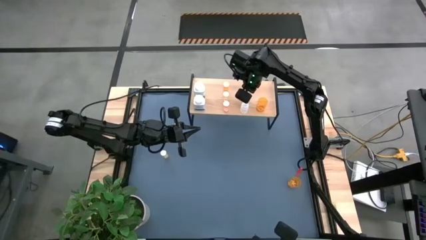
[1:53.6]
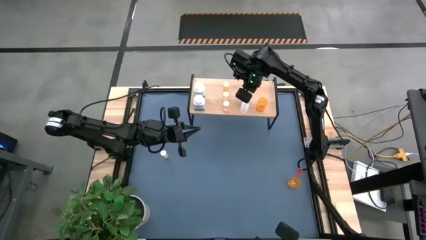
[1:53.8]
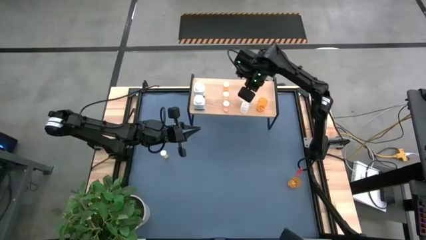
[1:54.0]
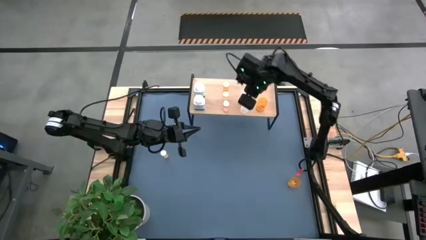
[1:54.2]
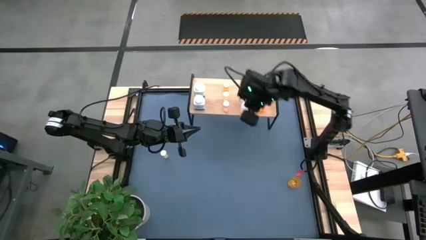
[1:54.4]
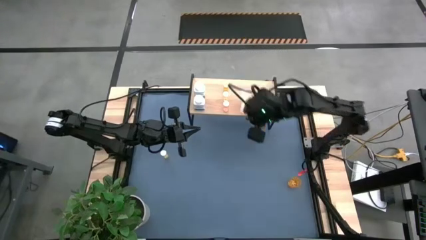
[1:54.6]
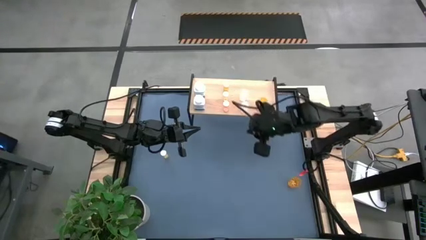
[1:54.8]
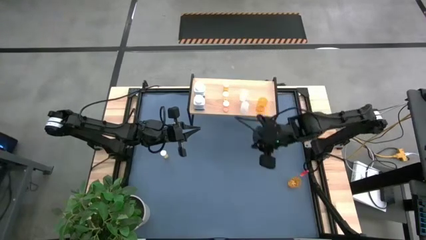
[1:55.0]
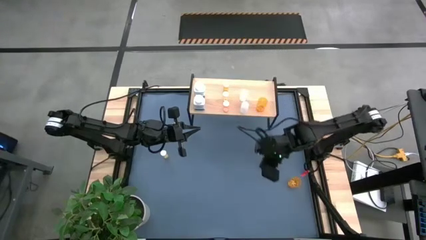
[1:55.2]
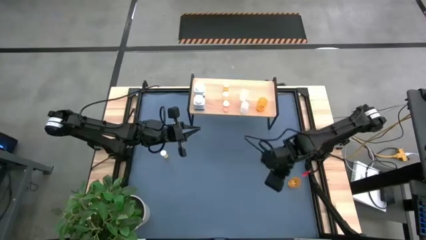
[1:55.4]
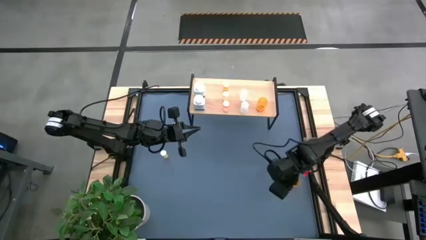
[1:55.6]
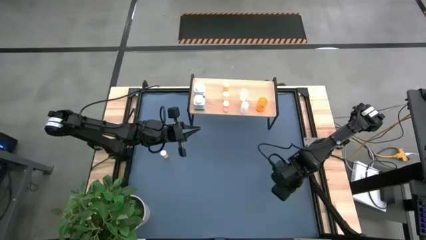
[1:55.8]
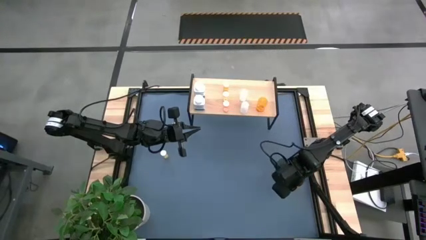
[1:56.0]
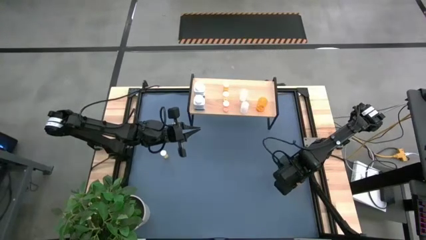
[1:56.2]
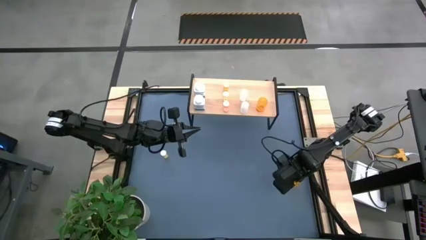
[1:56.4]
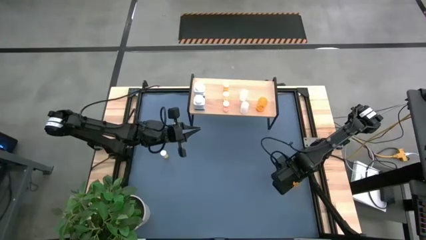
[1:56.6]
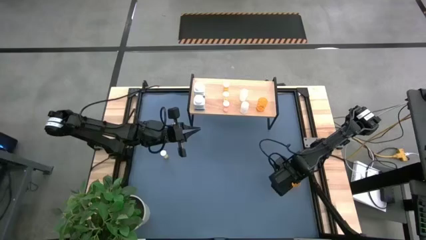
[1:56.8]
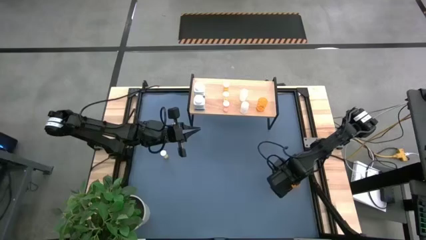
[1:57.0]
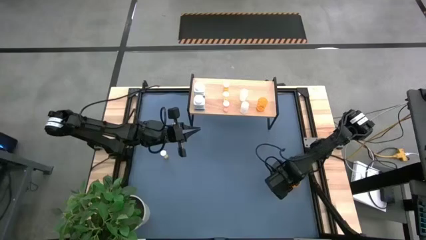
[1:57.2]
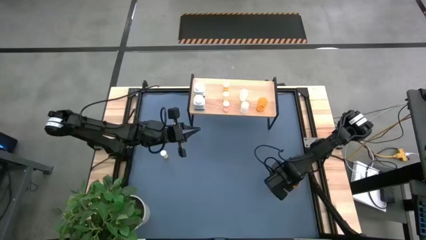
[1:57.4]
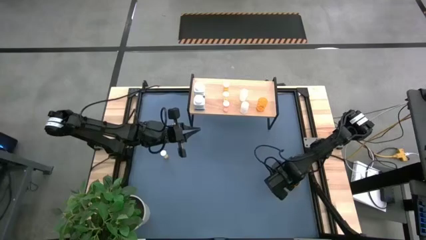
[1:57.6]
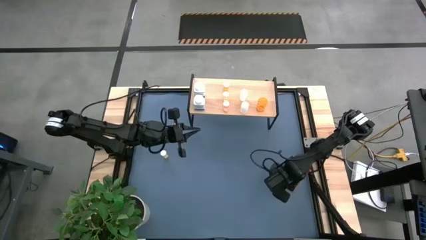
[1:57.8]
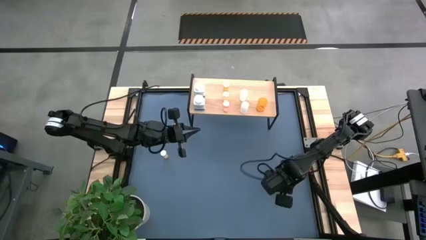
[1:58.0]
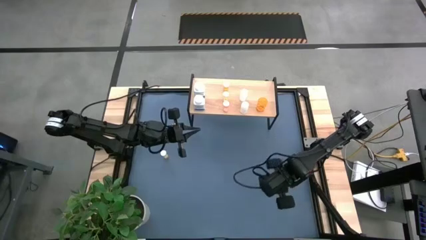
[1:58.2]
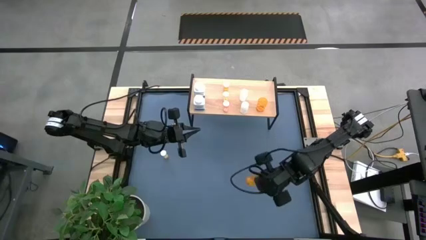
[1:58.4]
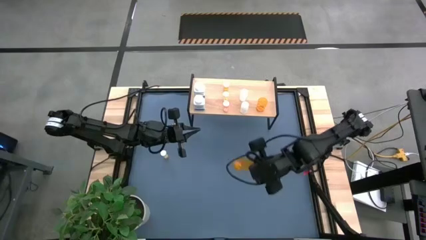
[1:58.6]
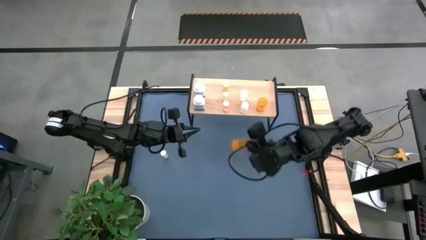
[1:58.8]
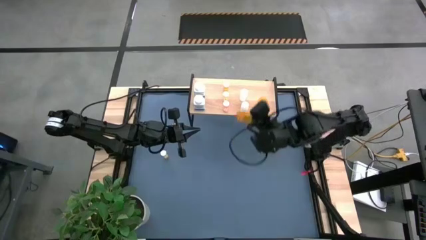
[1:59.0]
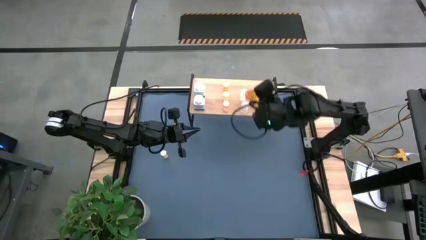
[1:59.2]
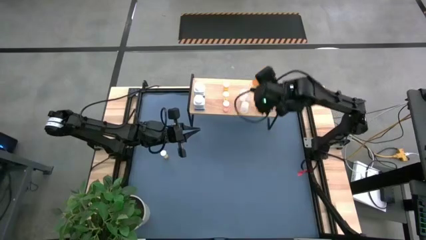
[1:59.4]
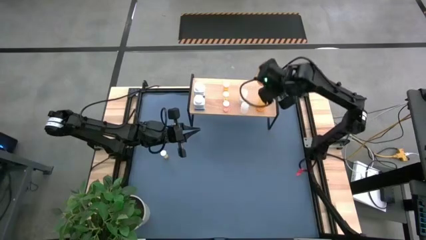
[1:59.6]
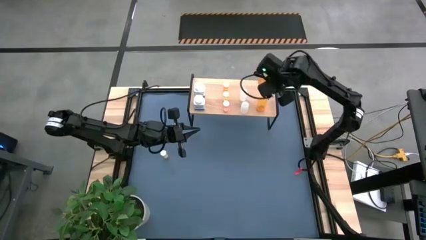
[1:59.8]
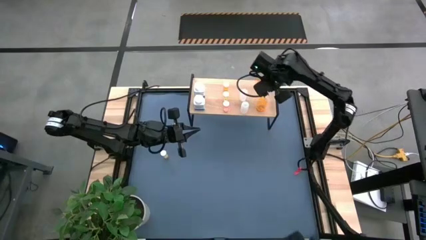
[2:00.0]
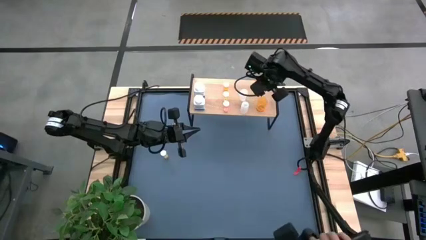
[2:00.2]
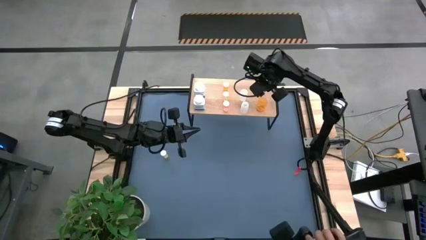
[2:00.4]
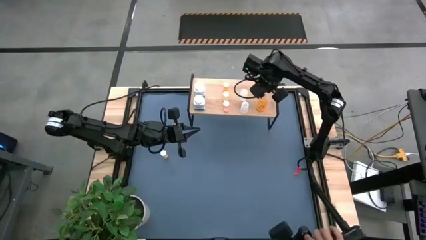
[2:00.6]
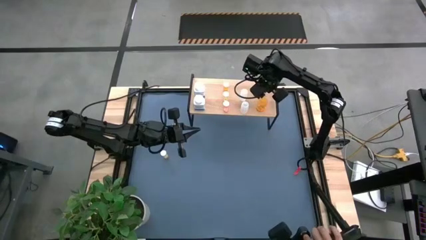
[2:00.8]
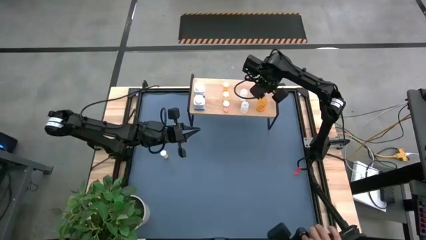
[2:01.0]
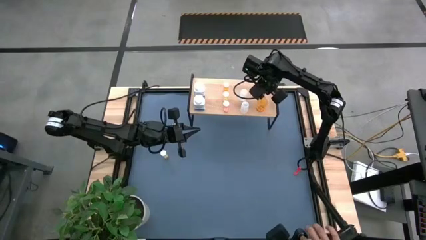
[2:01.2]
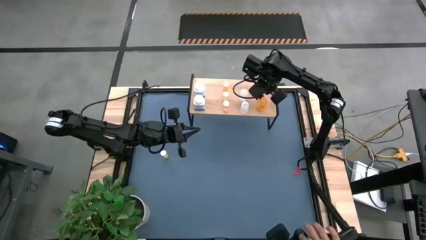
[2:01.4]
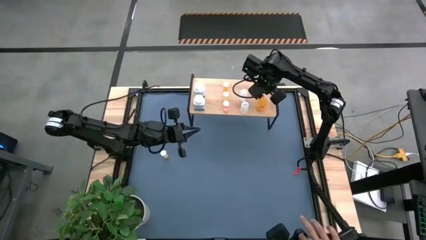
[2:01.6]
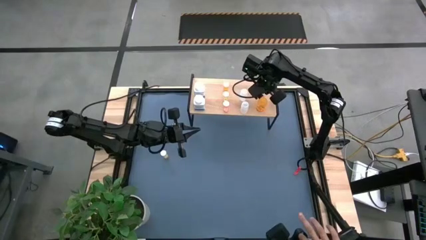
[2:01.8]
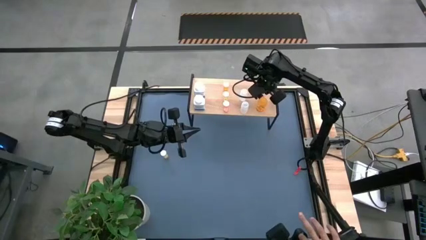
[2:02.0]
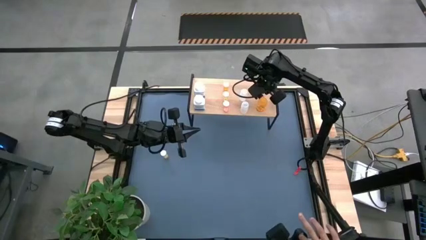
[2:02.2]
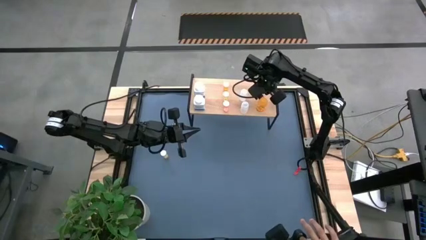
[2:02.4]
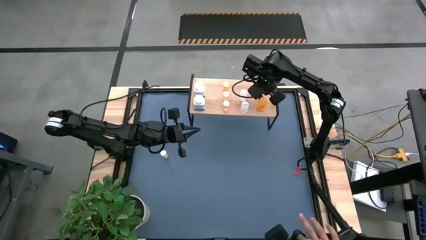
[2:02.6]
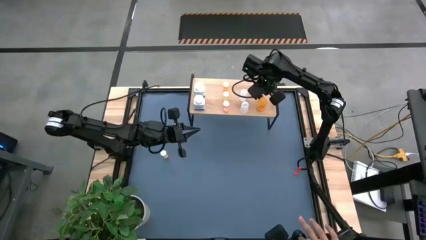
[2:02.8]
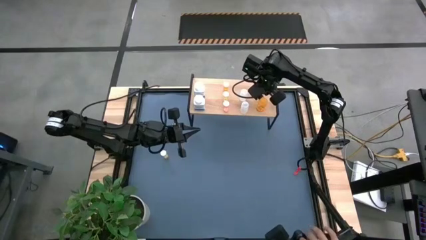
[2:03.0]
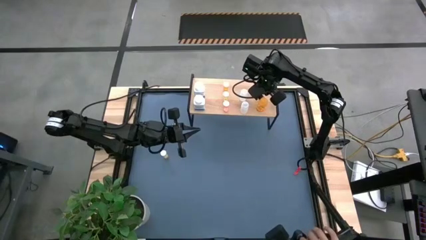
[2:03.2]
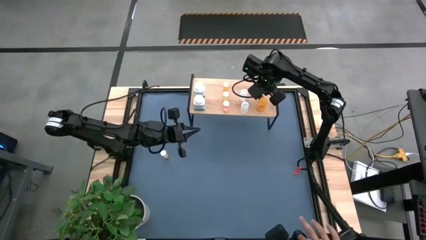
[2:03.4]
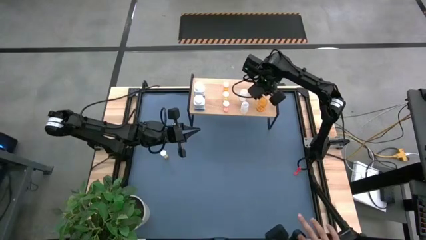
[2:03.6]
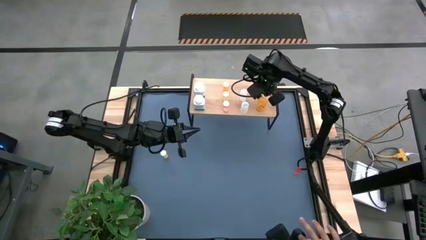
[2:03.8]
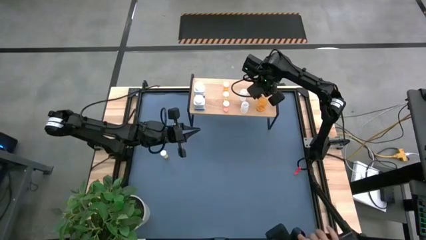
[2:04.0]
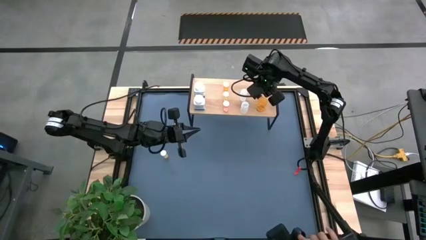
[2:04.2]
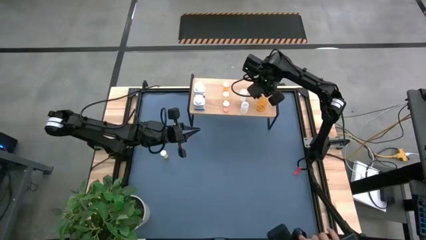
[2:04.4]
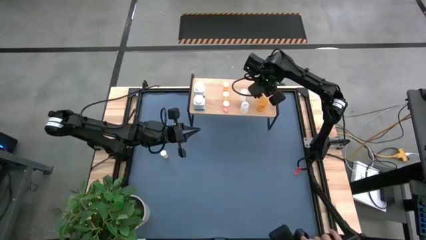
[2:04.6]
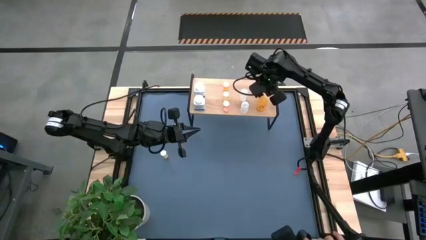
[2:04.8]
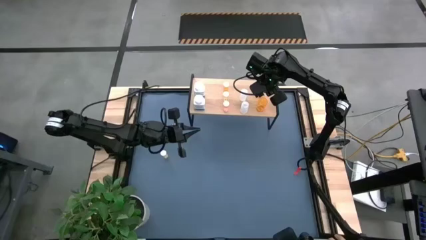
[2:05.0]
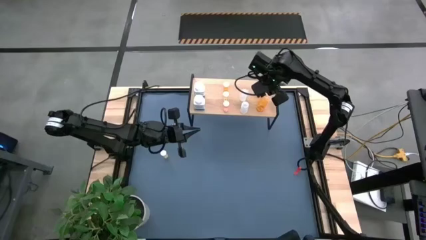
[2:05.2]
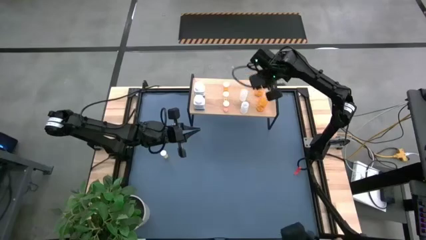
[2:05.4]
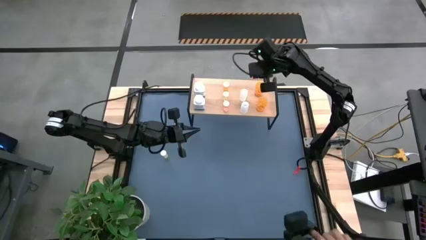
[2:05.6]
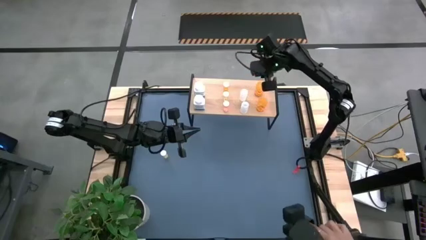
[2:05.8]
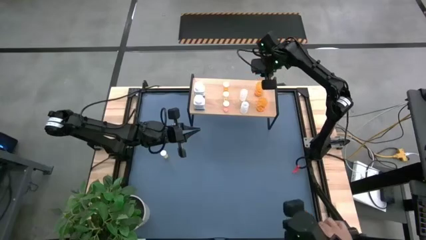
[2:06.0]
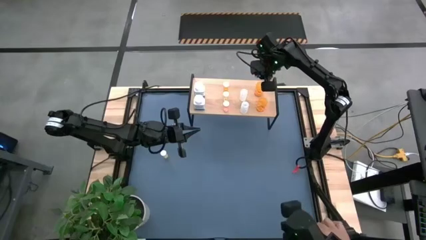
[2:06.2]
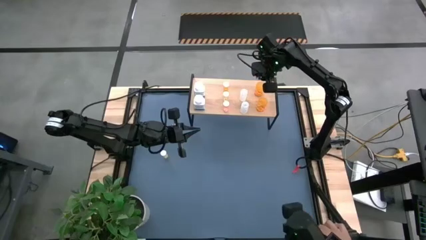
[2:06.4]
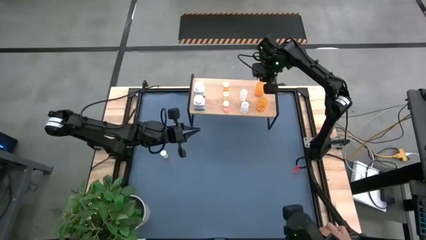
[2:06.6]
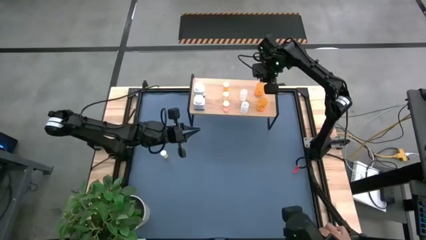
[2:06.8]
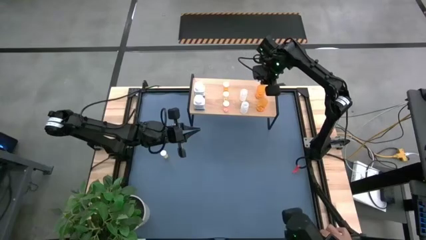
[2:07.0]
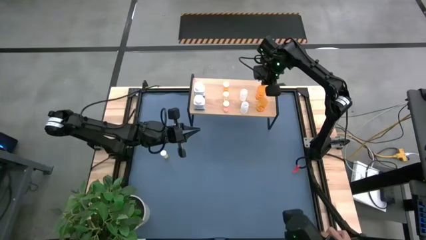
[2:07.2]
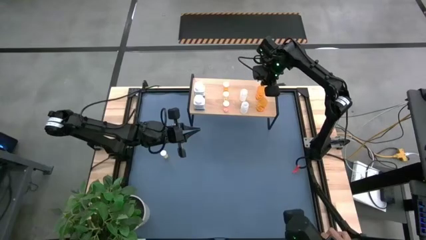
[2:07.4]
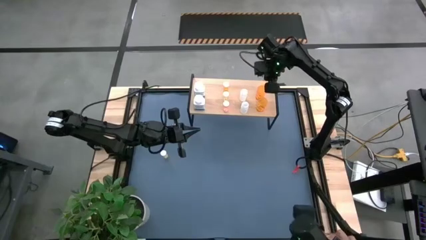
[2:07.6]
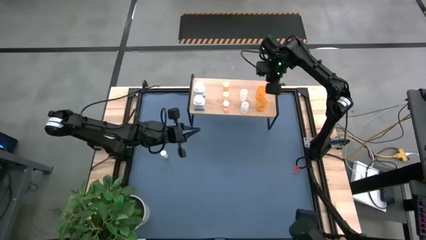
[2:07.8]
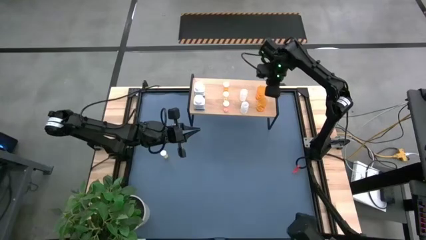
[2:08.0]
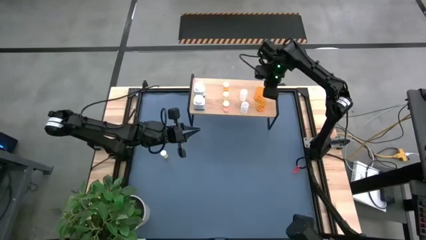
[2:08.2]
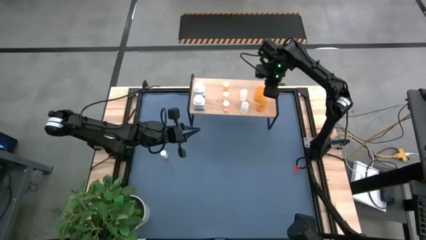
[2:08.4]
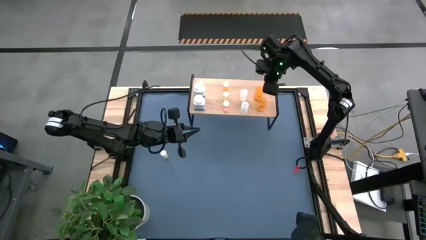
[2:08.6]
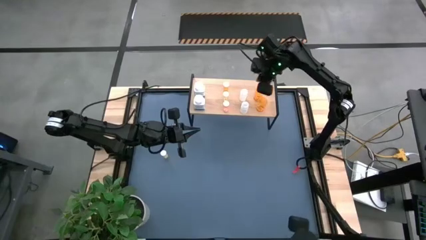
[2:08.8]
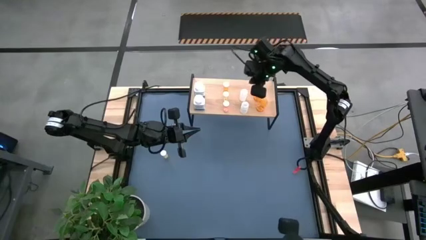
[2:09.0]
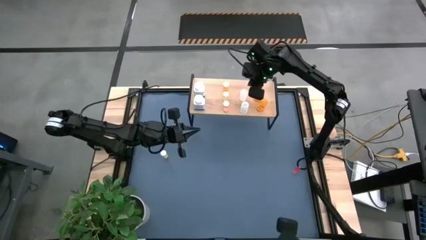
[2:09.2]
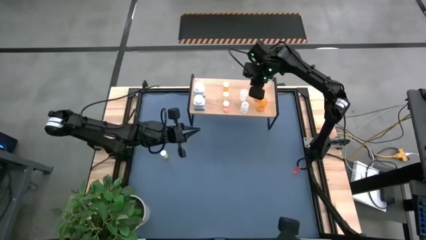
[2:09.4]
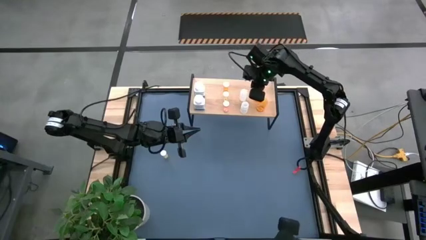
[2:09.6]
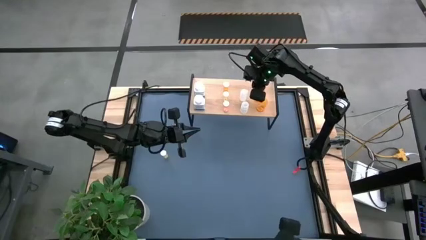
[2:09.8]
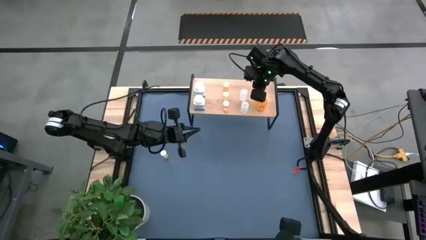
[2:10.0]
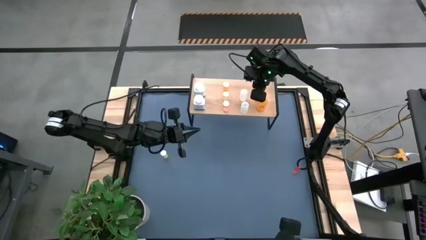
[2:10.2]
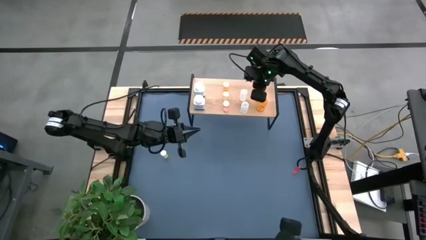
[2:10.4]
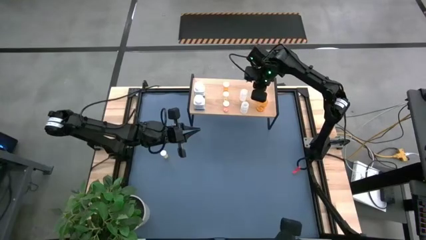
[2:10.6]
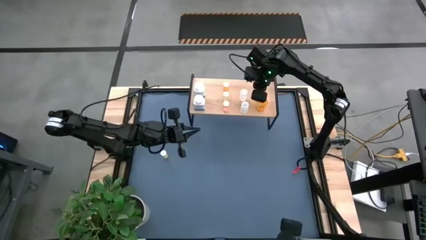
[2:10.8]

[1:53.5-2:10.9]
Task: Pick and place medicine bottles onto shelf by color
Put the orange pill bottle on the shelf
